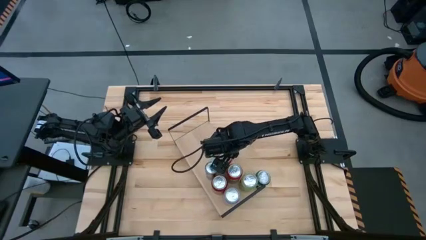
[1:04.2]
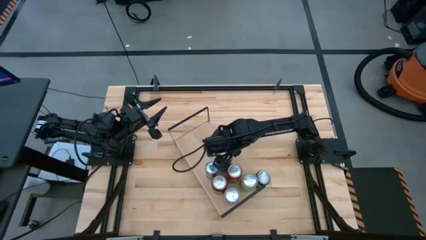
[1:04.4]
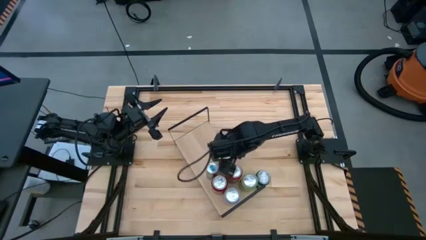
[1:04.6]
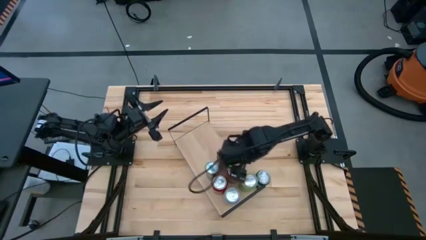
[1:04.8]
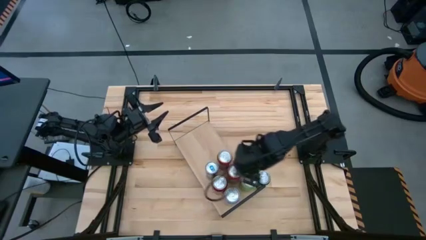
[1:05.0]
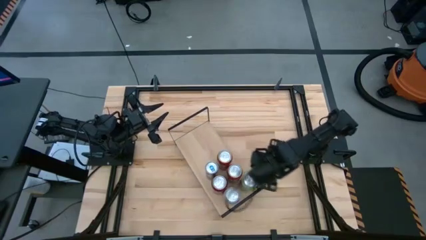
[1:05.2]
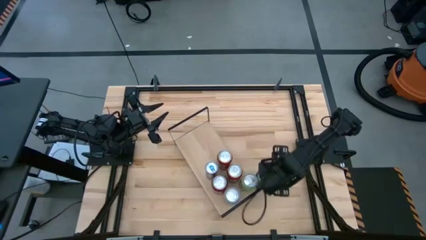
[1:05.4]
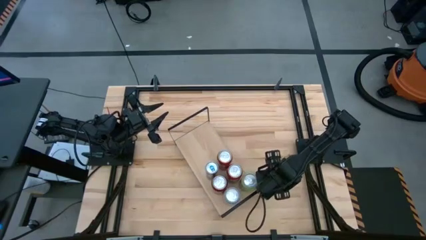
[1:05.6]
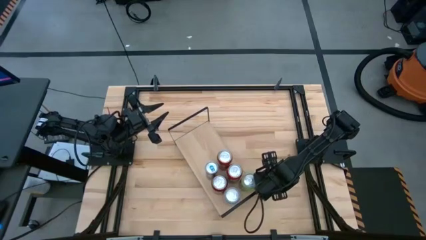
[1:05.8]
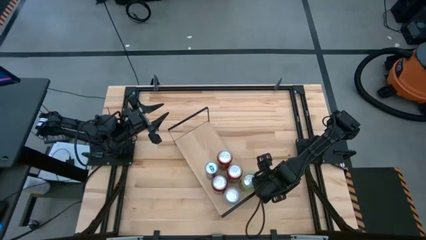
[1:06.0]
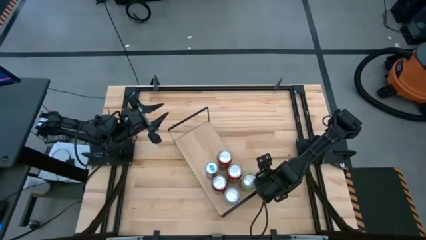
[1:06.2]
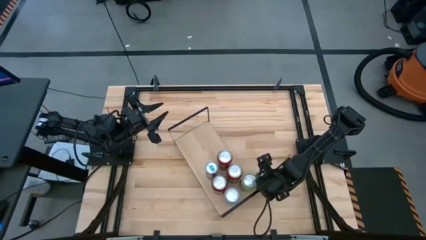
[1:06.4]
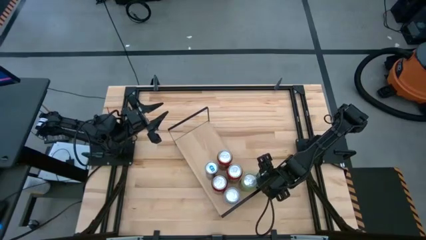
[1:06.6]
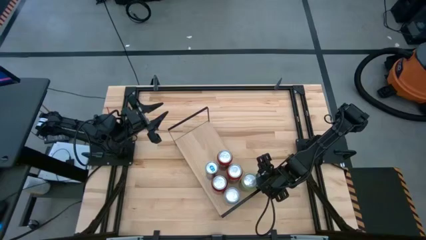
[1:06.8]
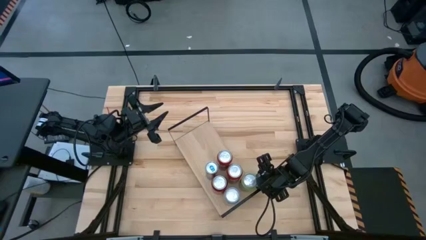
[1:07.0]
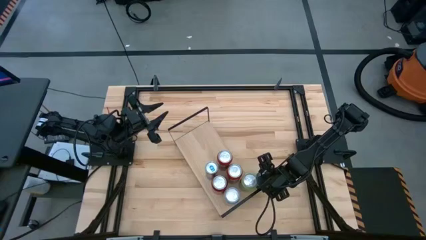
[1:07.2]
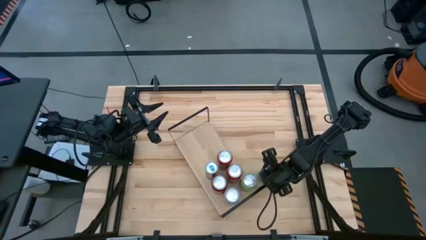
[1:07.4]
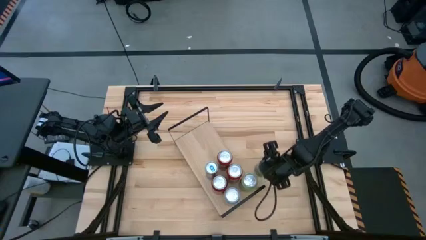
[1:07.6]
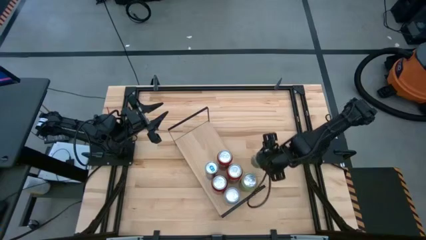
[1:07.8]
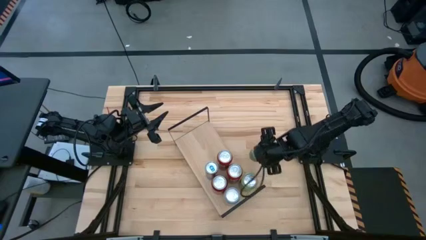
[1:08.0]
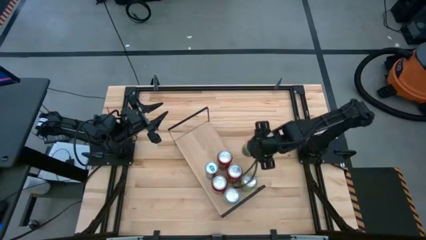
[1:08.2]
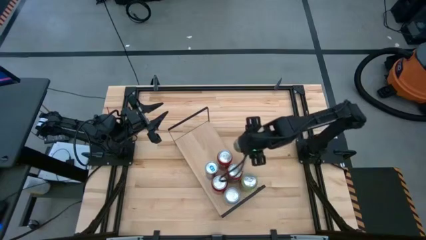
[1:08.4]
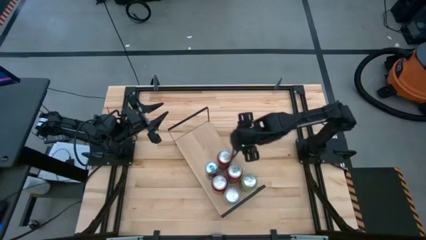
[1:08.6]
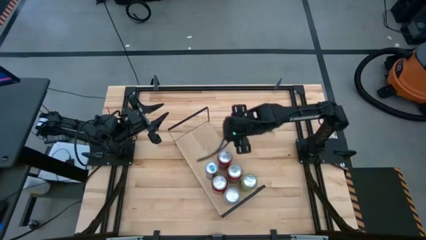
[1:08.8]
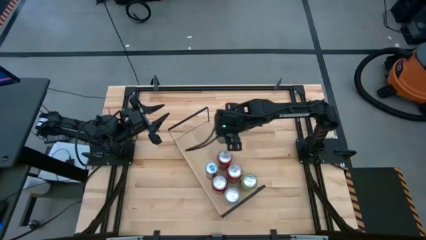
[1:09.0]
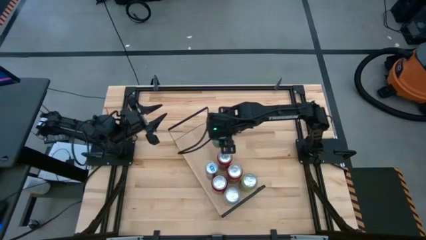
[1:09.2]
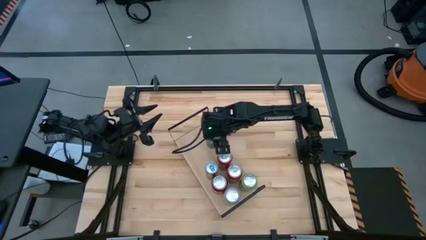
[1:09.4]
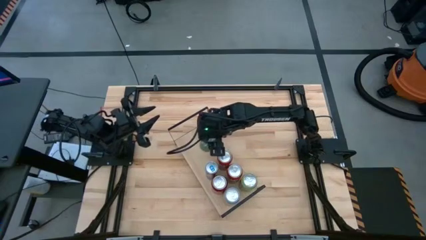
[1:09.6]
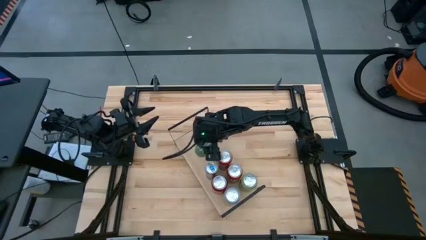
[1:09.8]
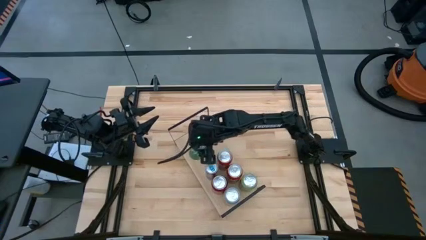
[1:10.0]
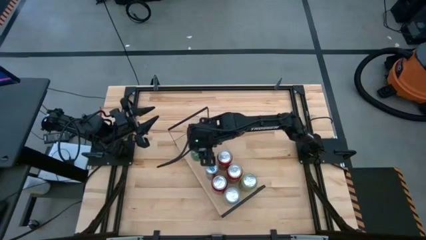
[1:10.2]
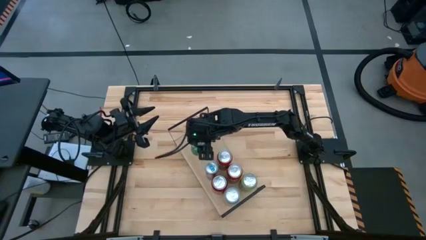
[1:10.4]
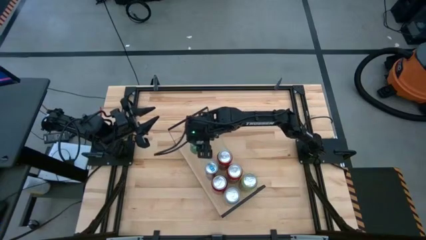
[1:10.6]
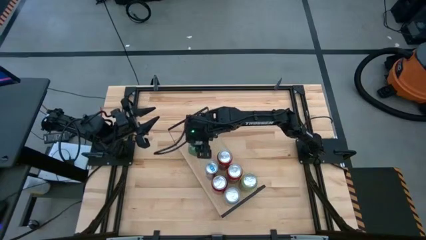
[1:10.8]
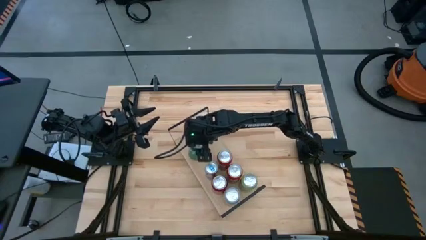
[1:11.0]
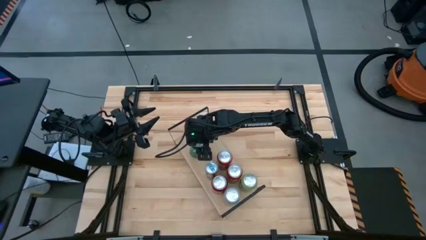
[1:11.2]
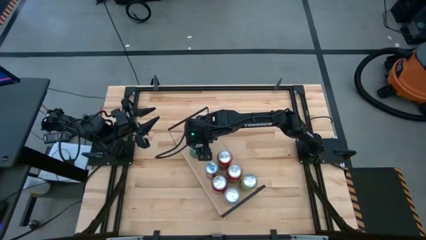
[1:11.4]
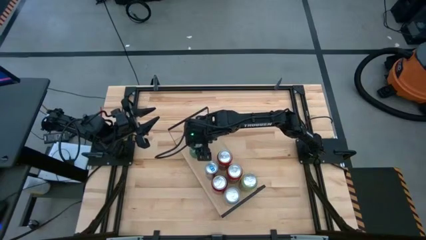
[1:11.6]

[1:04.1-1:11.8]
Task: Place canned beverage on shelf
Put the green soda can on the shelf

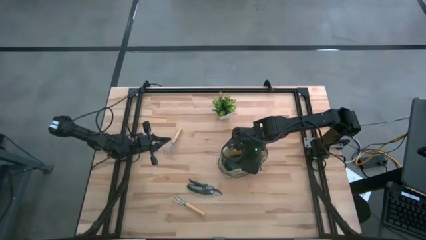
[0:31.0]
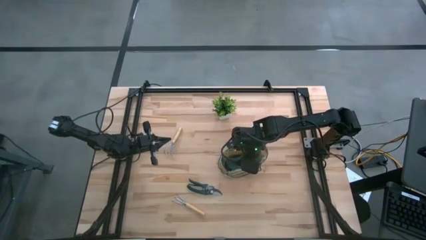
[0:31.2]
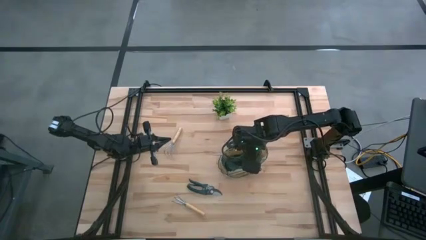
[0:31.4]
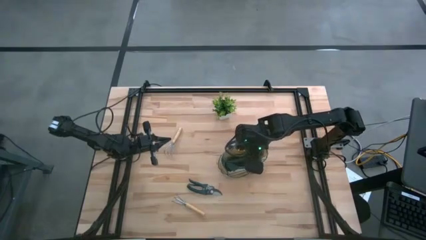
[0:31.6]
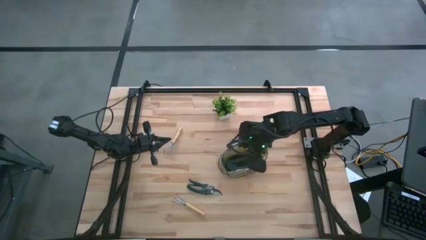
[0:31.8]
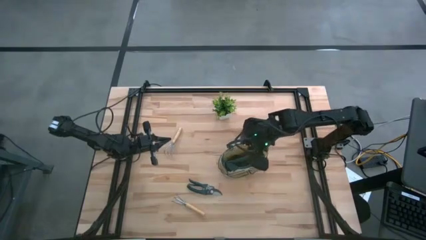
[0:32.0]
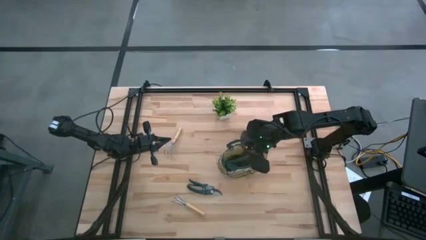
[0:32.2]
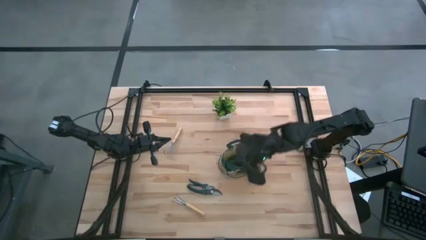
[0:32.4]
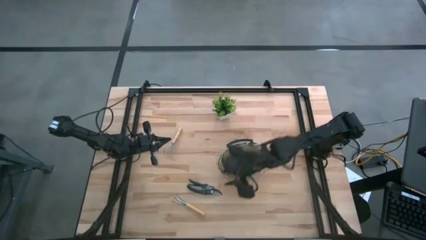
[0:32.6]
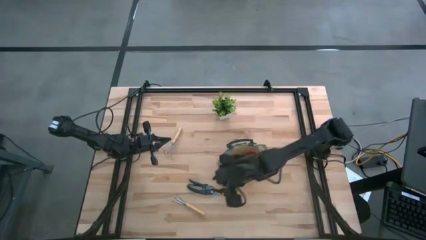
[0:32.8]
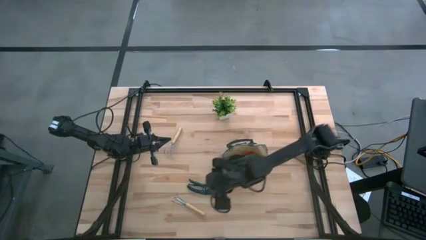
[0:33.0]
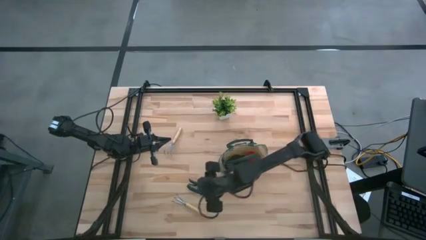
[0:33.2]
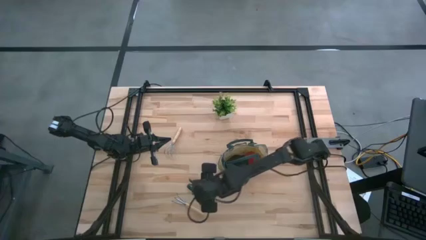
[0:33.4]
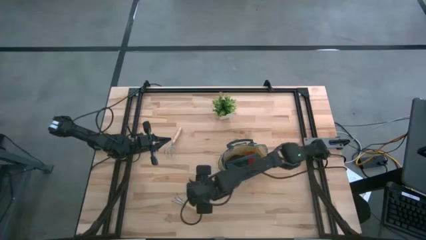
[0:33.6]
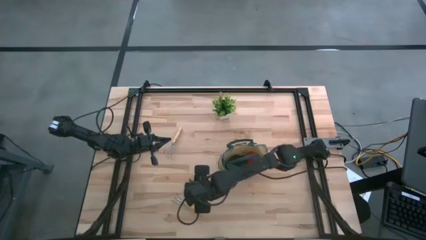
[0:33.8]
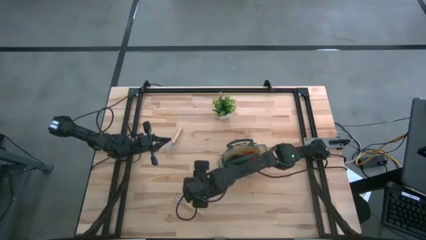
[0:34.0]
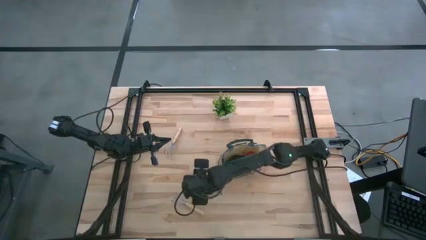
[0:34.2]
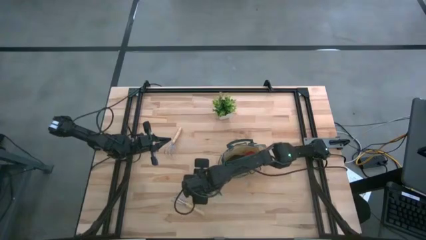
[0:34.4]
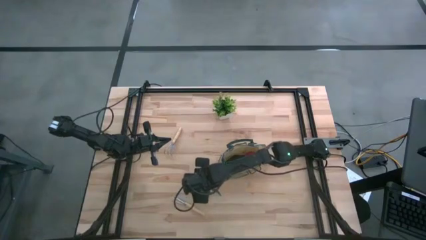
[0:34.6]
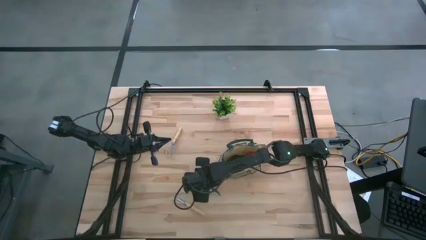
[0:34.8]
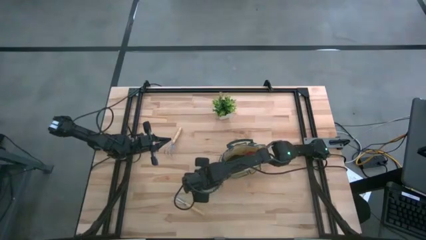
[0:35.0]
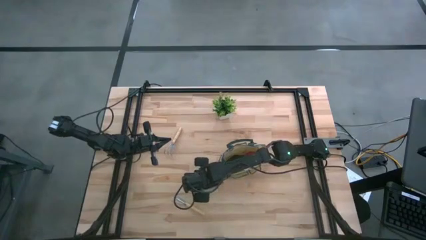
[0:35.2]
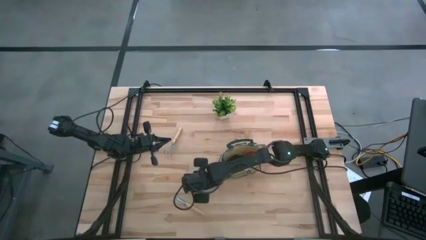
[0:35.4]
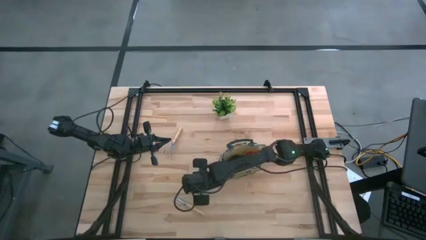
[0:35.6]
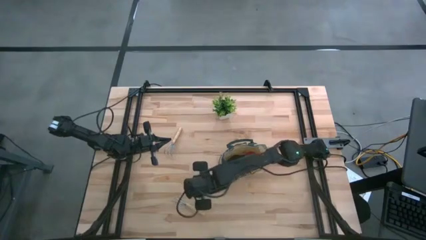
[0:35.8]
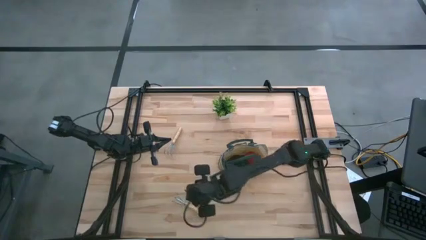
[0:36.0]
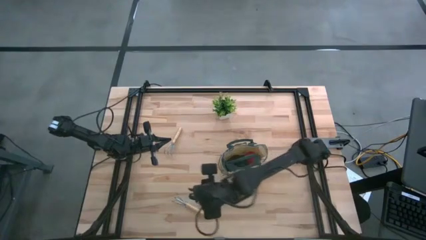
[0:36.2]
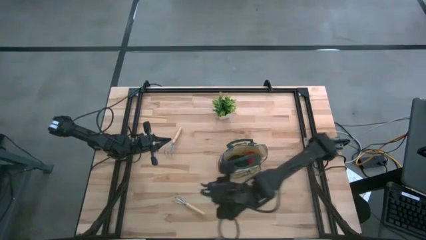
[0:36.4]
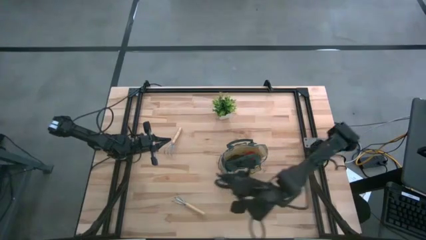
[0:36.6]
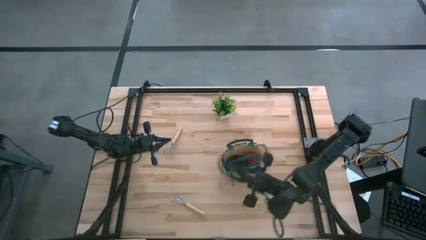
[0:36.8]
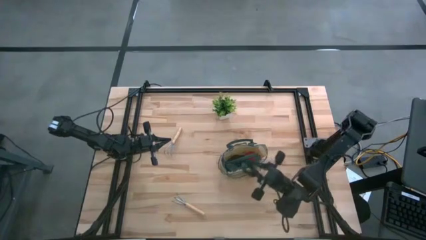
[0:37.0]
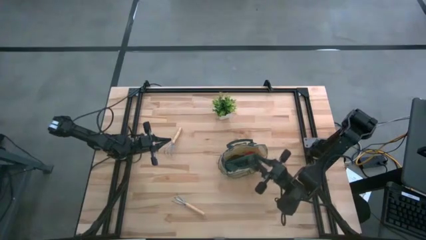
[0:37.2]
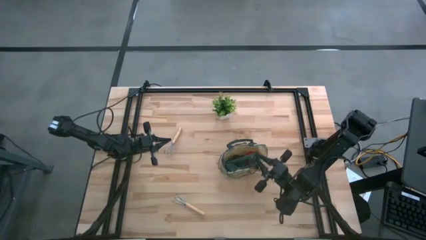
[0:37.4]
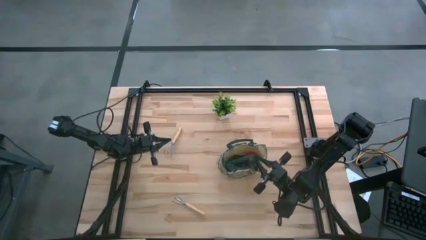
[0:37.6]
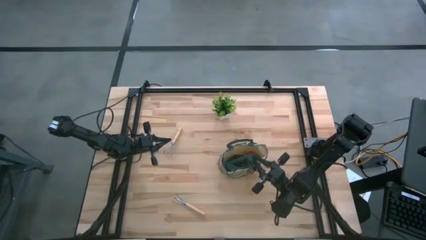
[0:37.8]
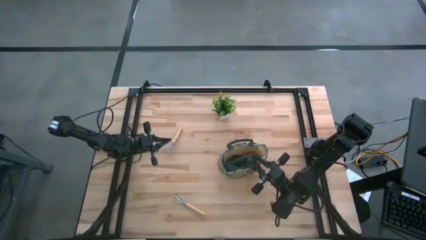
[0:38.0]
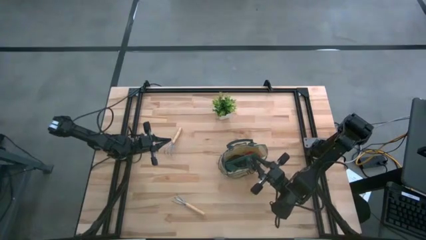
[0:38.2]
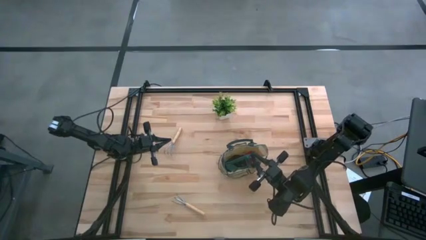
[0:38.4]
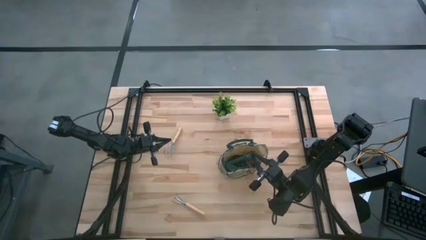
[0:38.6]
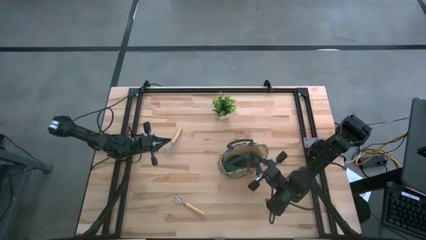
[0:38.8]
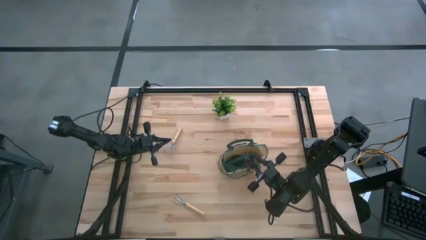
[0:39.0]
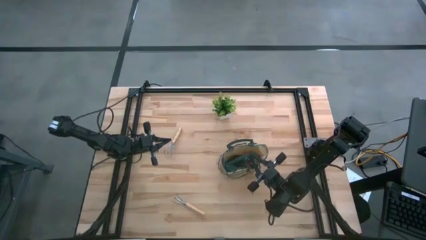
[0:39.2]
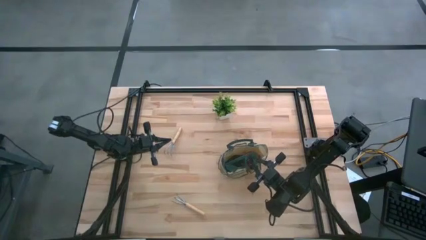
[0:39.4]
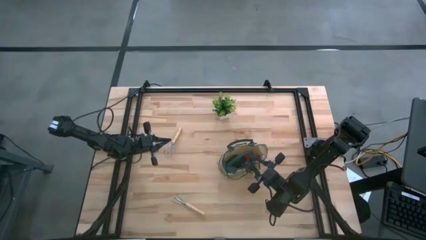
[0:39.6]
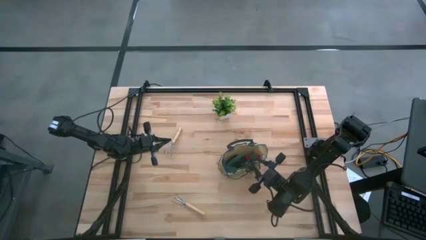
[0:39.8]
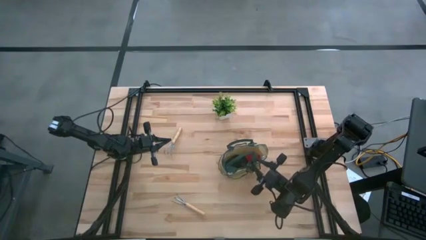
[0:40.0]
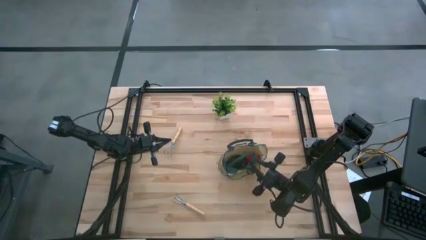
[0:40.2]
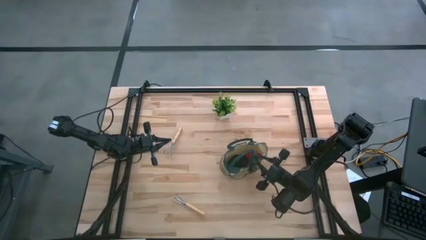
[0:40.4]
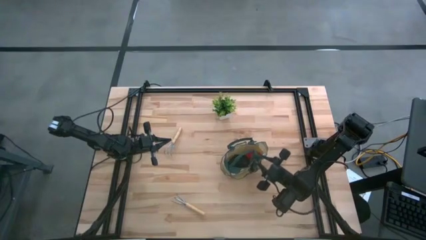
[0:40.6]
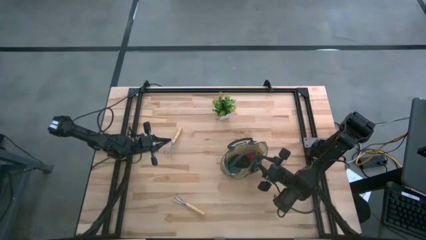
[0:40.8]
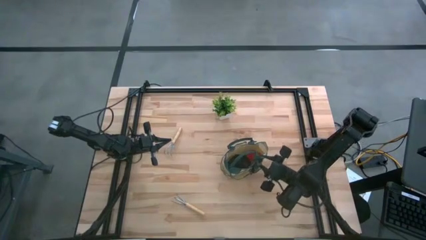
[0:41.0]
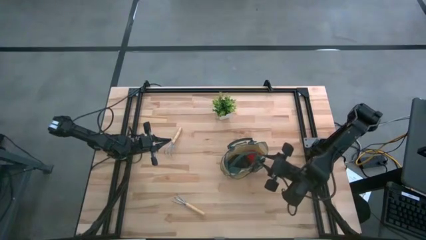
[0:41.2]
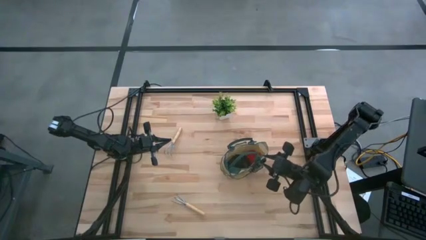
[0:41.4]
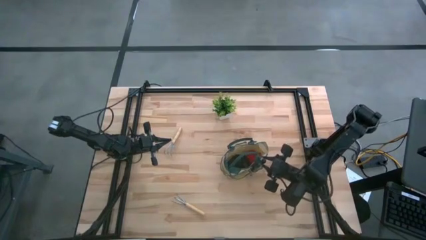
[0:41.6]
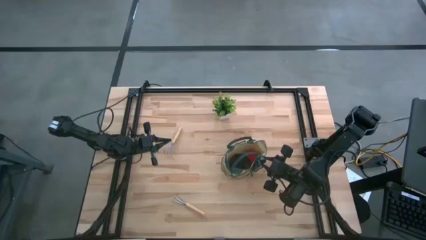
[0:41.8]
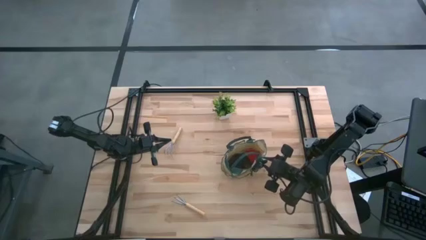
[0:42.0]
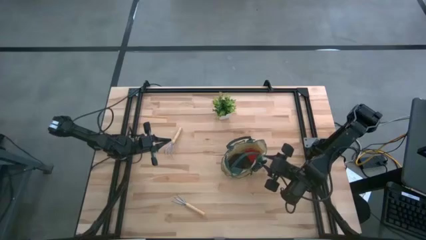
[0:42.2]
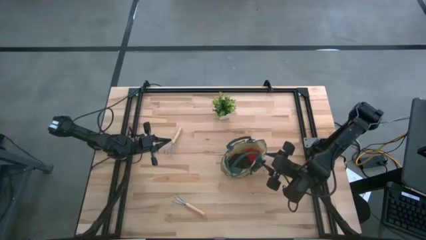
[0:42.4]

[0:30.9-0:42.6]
Task: Pick & Place Garden tools in Gardening bag
Put the shear scissors into the side pocket of the gardening bag
